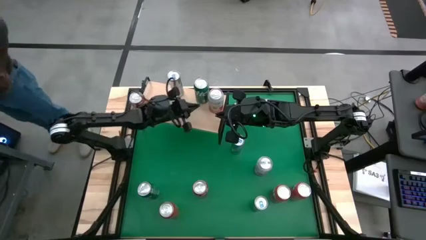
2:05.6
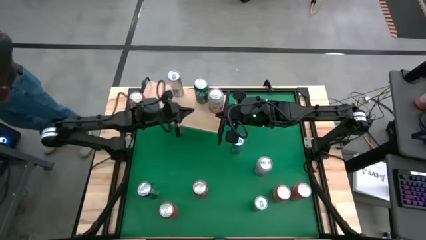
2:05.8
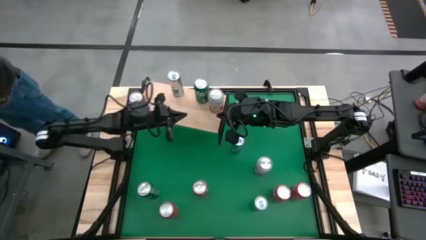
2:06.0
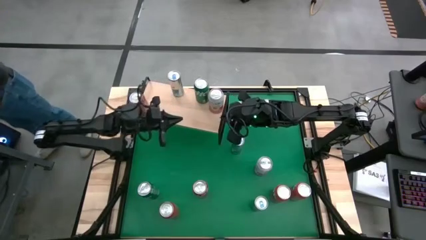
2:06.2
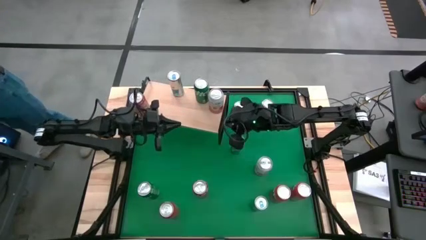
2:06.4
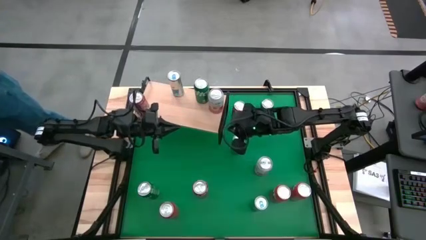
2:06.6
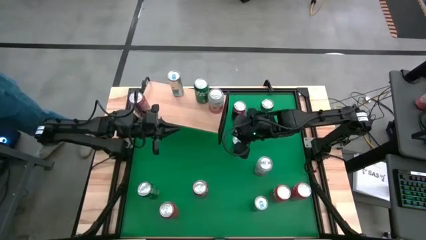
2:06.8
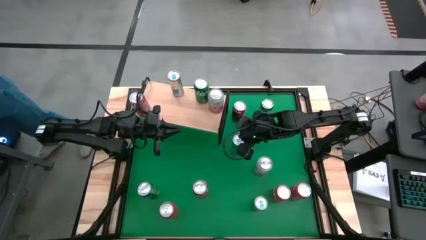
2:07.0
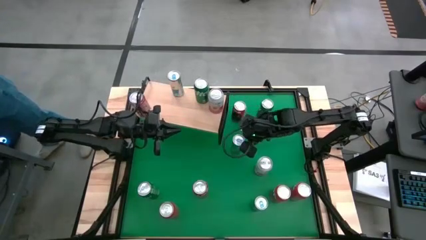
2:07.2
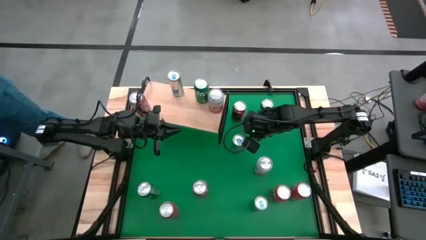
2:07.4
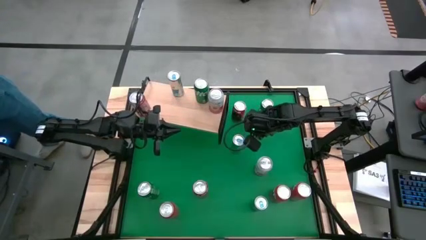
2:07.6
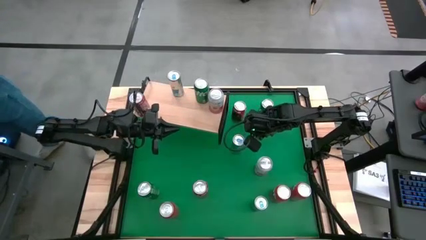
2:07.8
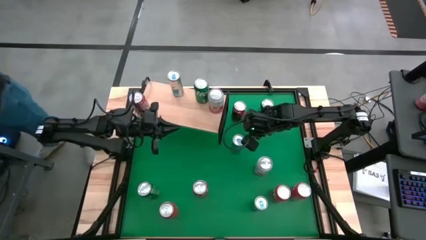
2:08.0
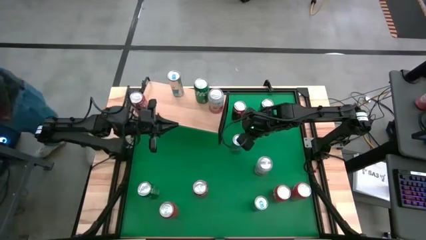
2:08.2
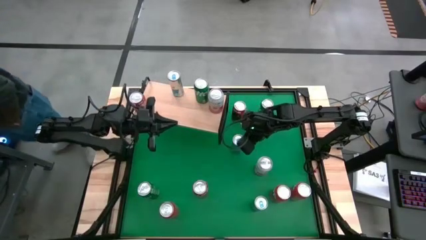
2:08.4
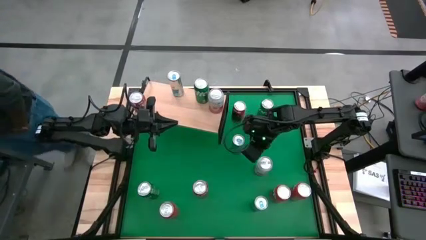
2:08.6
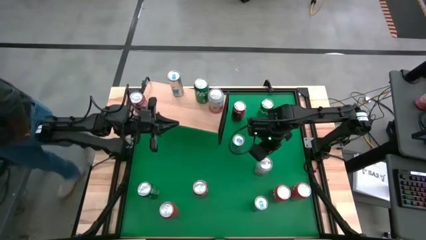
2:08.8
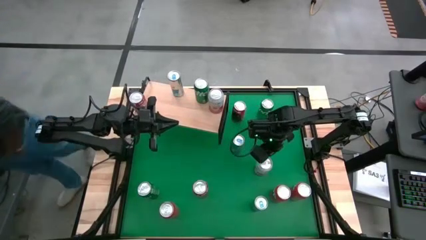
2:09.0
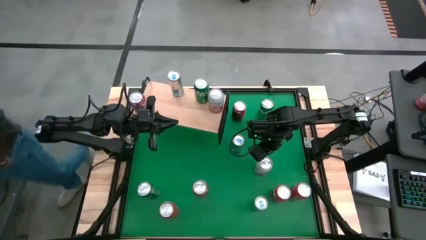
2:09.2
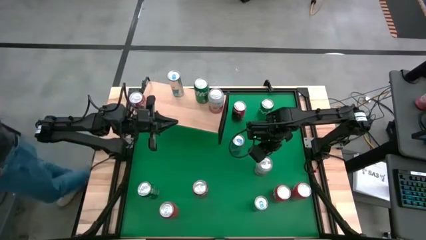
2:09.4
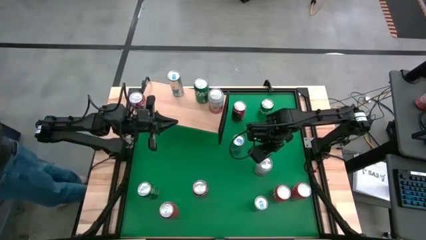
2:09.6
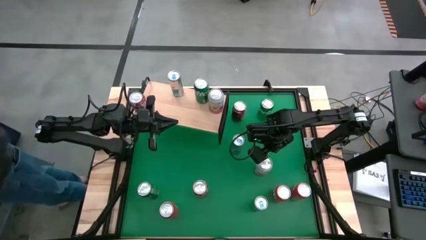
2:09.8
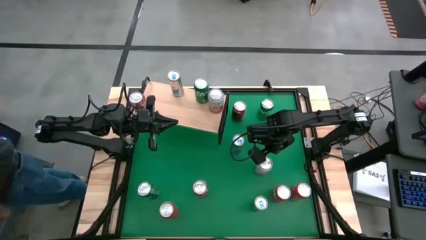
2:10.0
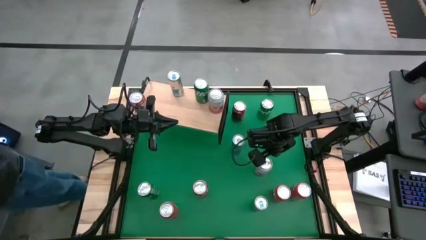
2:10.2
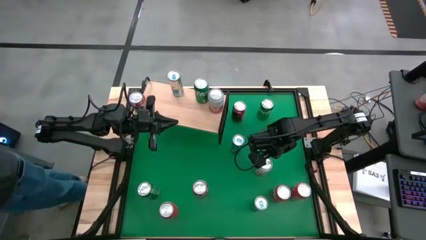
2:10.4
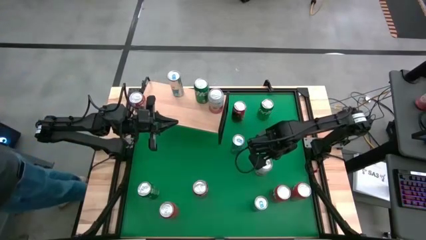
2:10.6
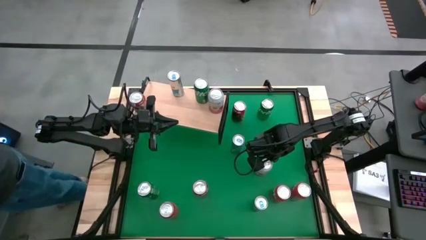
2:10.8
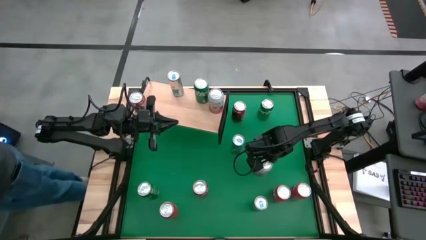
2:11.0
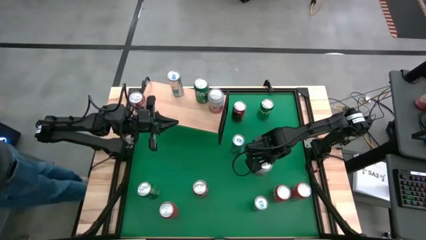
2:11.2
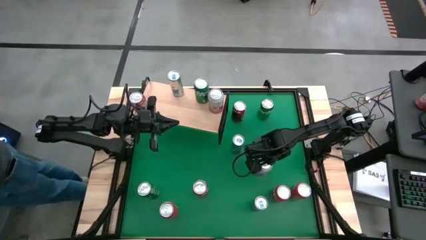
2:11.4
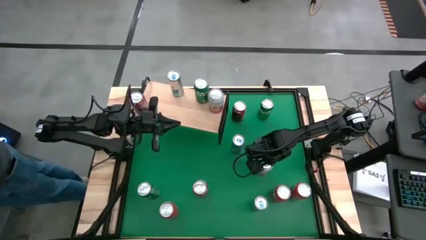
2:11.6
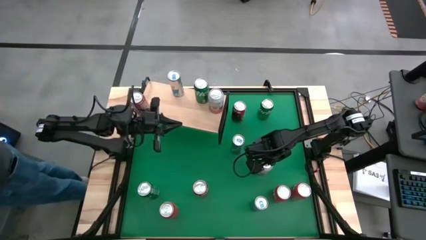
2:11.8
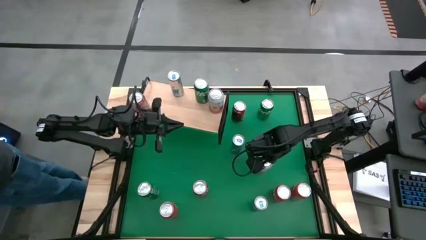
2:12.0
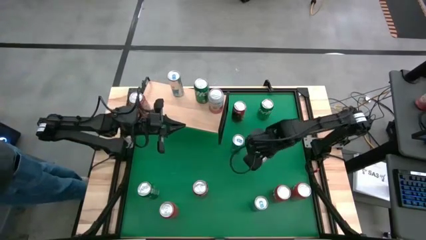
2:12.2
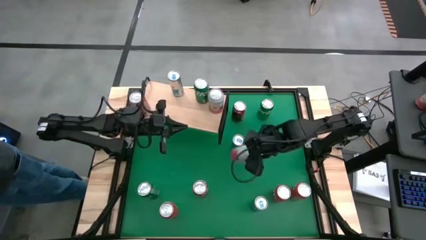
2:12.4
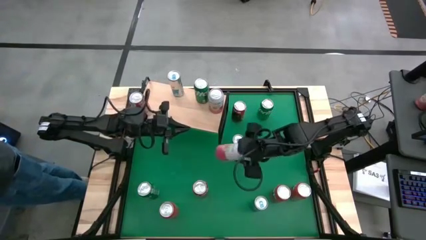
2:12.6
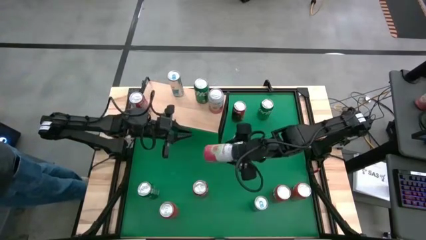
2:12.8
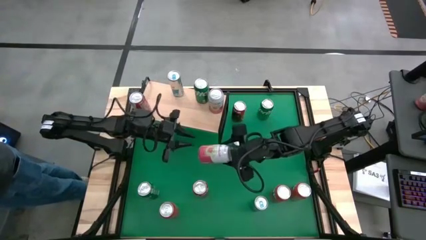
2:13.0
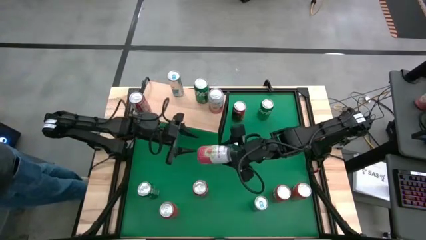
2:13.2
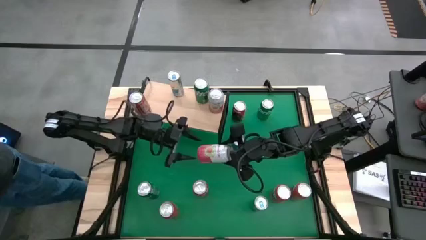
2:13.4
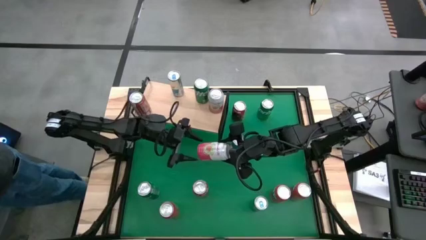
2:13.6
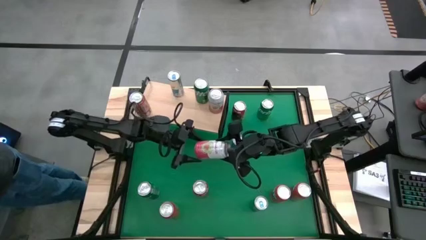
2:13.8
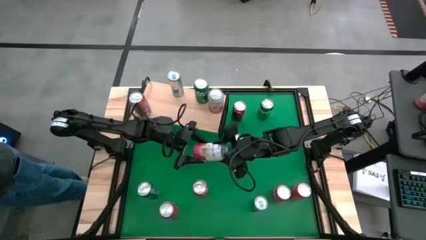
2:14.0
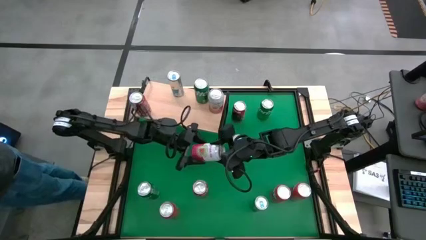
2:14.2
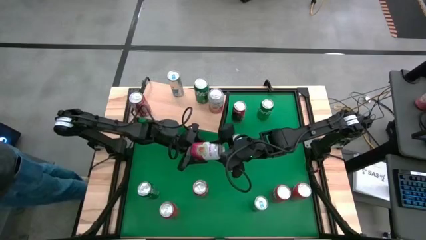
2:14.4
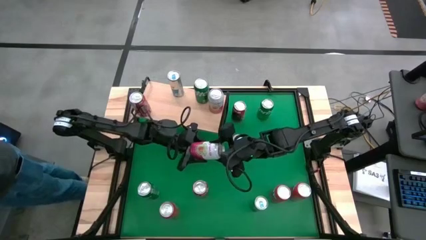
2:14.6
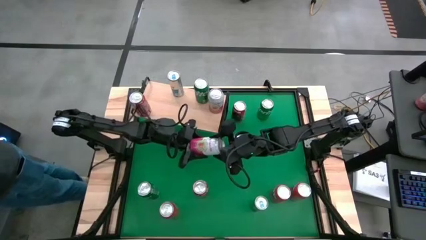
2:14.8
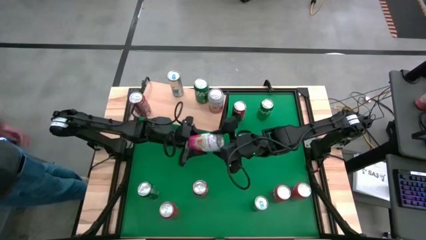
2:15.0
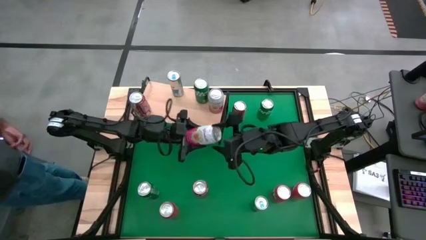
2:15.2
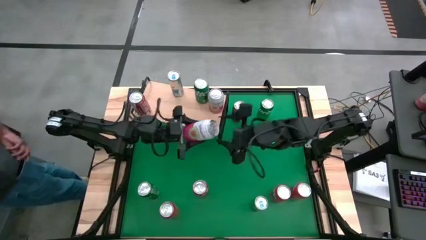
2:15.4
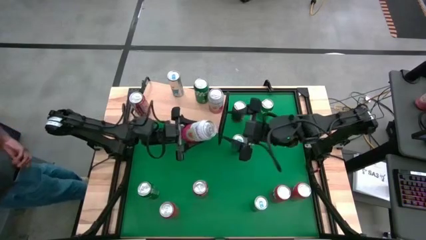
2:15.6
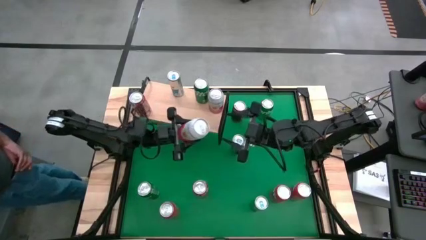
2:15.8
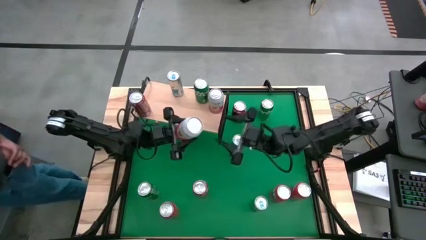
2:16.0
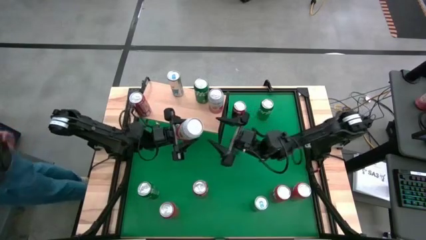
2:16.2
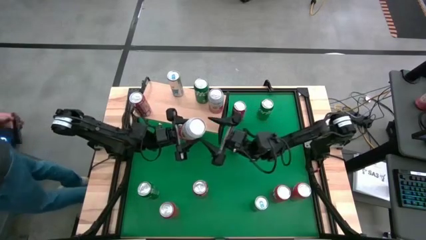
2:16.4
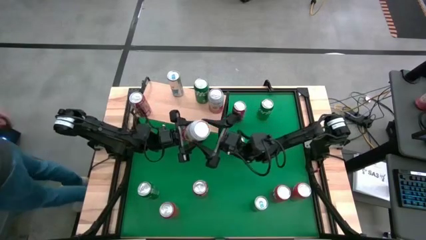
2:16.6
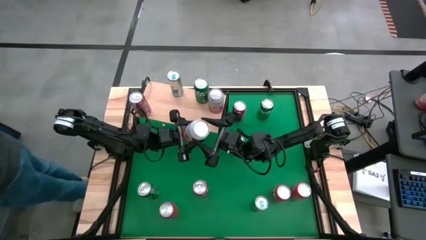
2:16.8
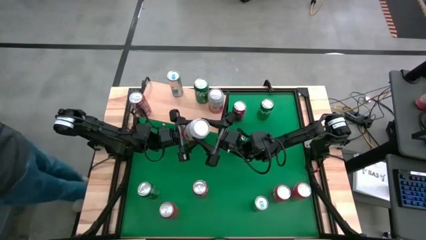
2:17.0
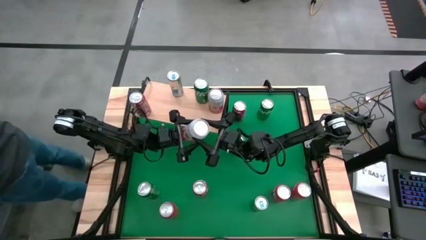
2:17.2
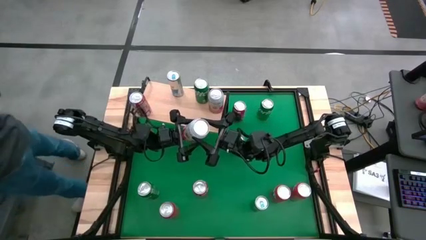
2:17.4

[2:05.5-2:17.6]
Task: Place canned beverage on shelf
Put the pink/white soda can on the shelf aligned with the other pink/white soda can

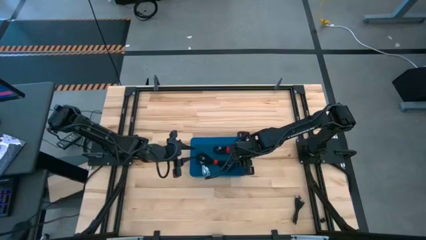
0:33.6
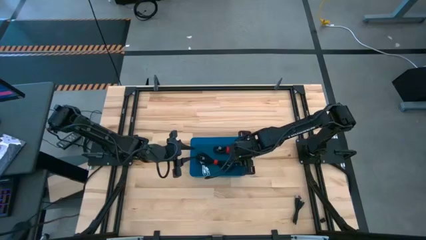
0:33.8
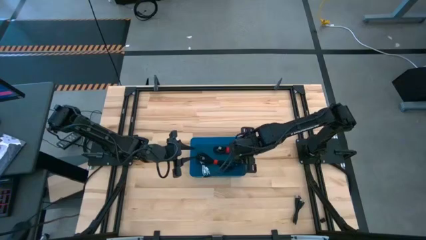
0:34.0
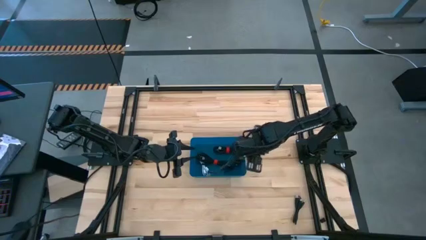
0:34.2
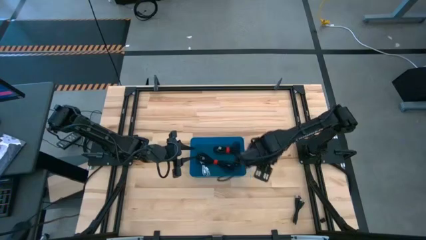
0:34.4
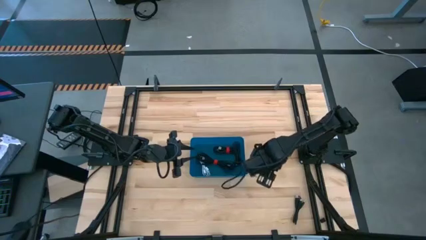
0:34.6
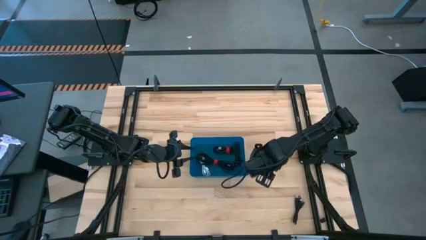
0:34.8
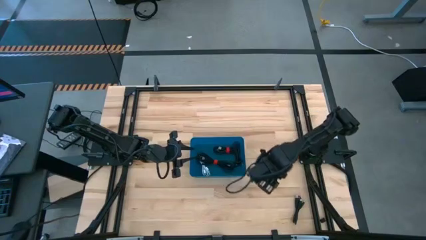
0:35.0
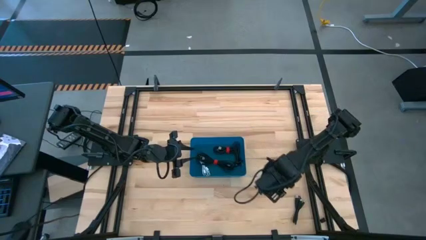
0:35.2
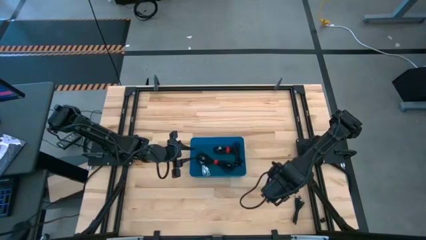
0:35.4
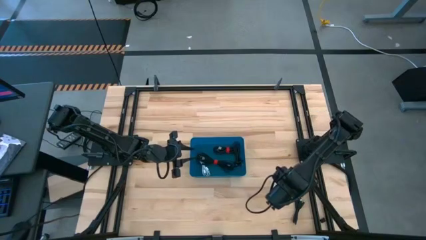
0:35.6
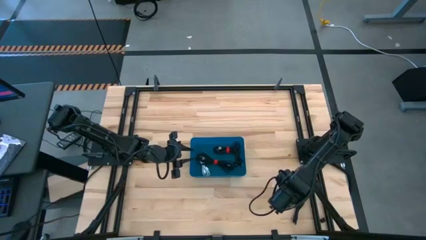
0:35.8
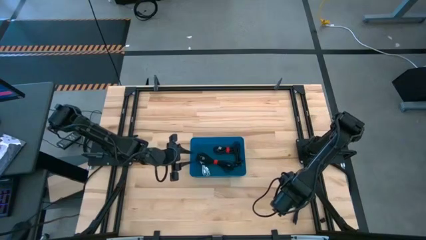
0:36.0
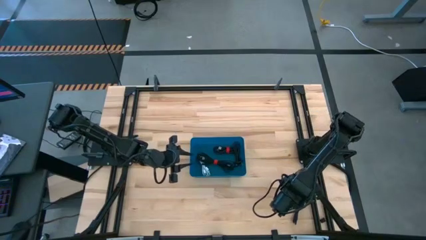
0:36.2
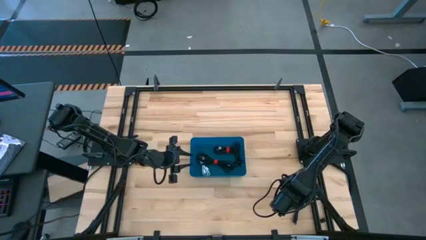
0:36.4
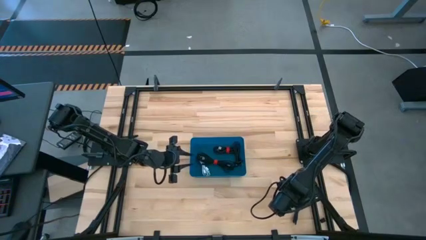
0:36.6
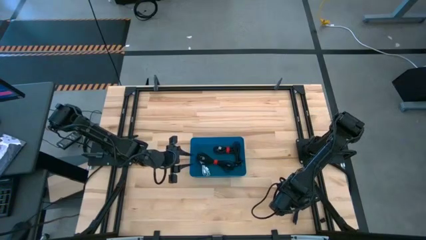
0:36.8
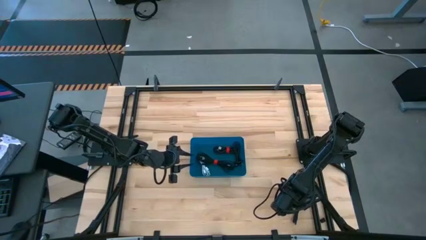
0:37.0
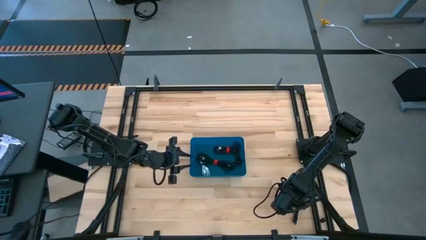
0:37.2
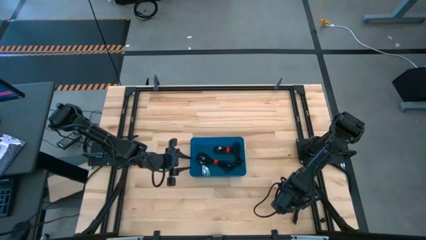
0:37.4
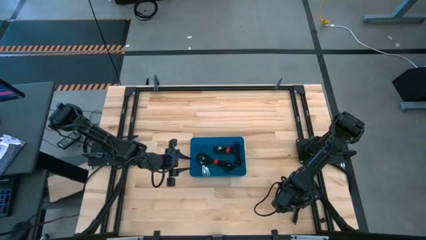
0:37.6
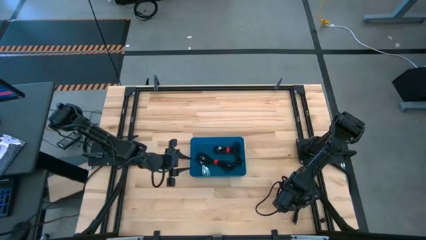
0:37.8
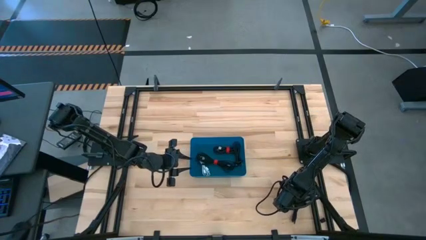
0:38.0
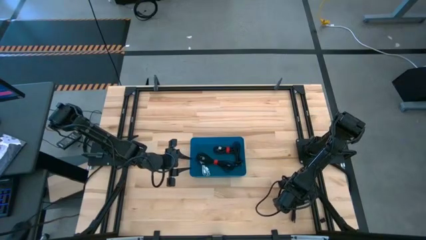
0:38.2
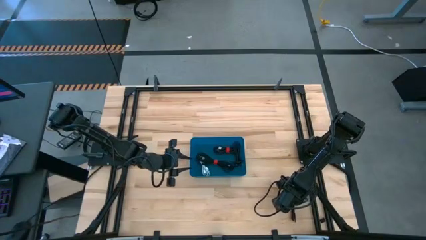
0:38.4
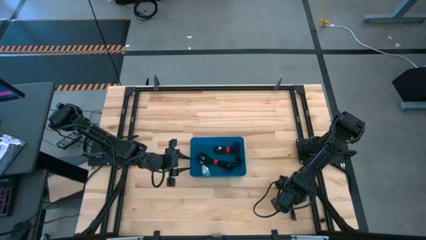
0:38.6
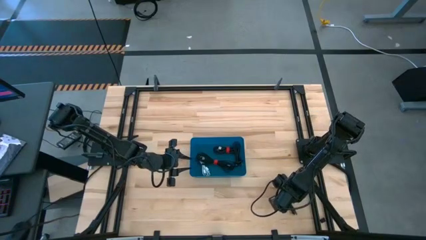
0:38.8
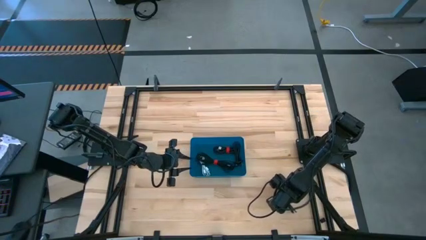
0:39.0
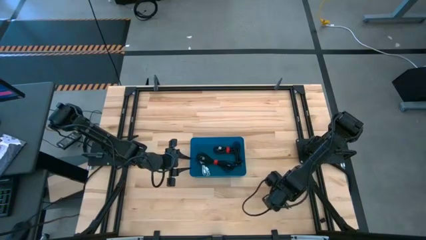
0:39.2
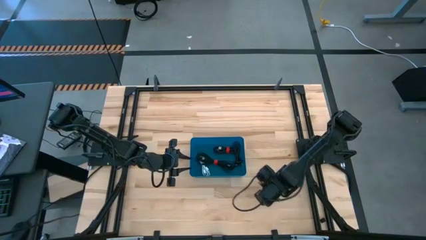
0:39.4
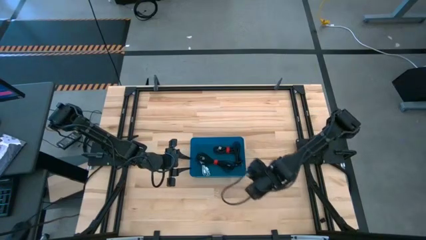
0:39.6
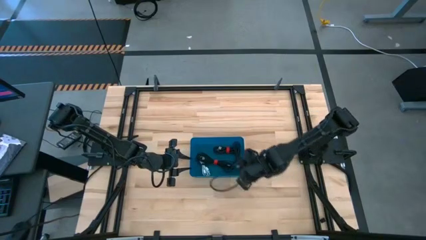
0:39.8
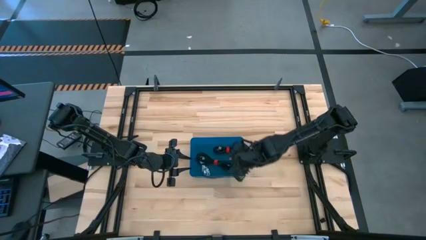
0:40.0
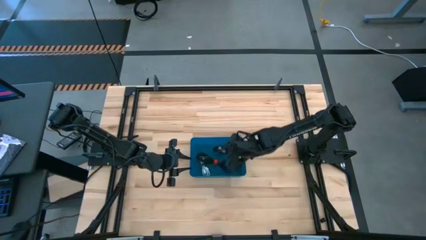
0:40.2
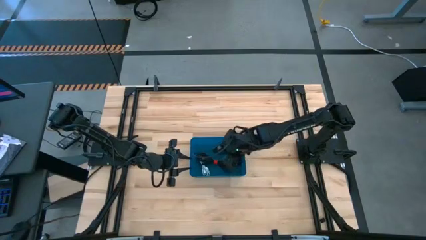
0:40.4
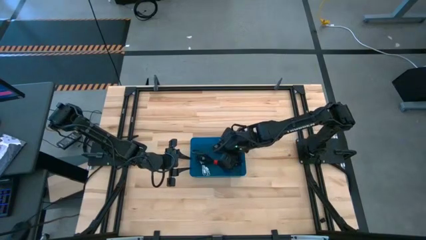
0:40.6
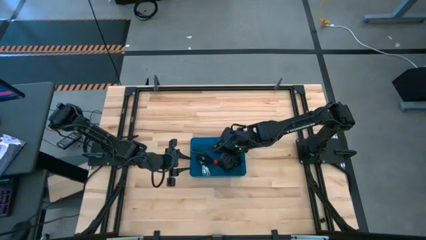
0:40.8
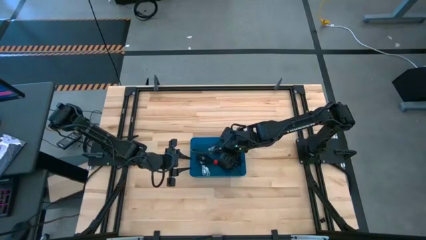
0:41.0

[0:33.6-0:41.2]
Task: Pick and place USB-C Cables
Put the black charger cable into the blue bin
